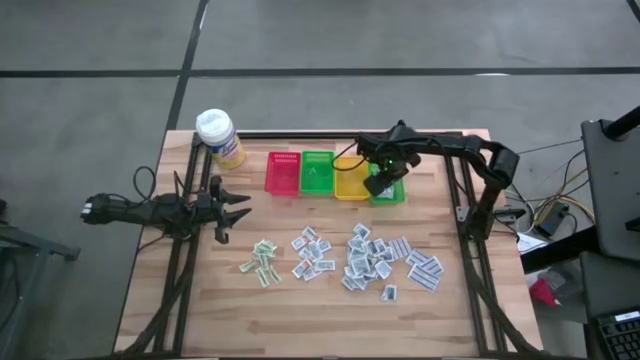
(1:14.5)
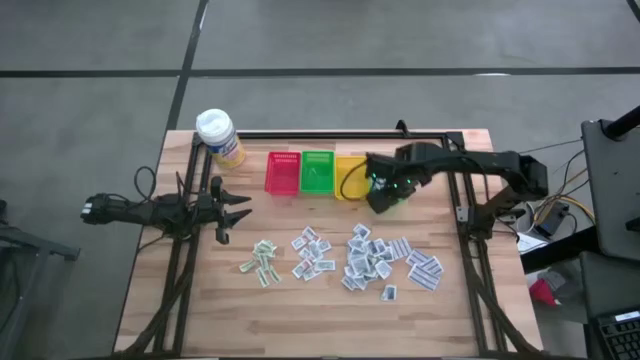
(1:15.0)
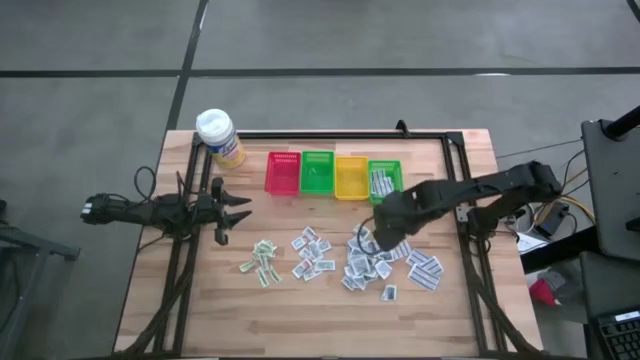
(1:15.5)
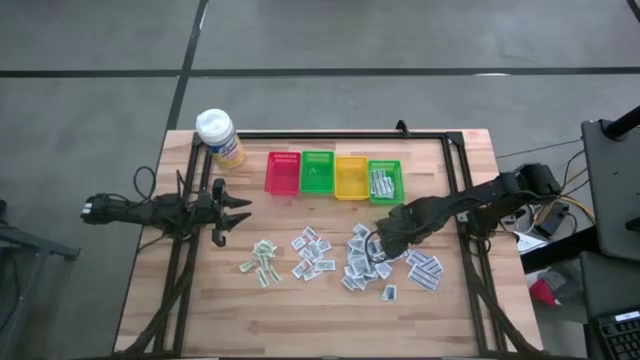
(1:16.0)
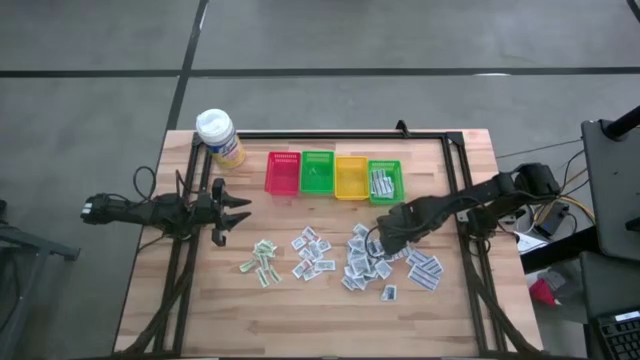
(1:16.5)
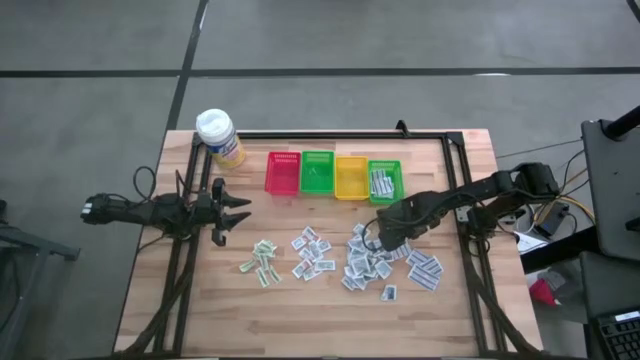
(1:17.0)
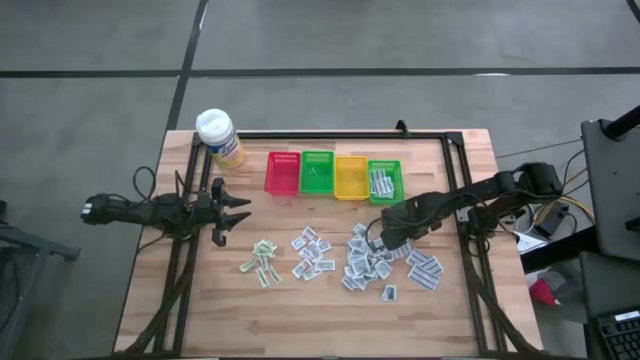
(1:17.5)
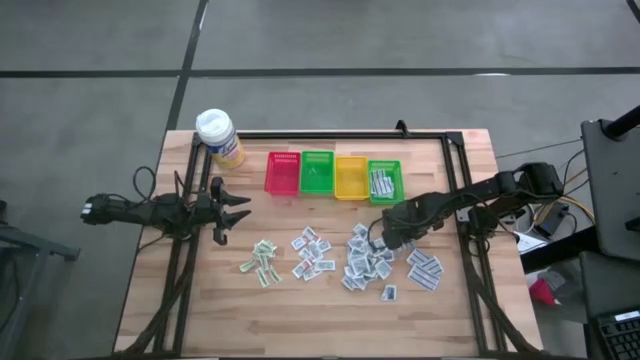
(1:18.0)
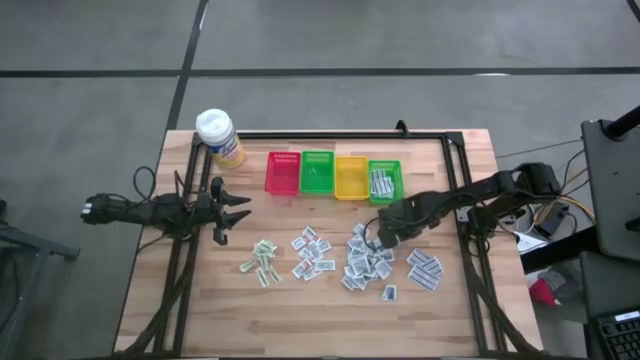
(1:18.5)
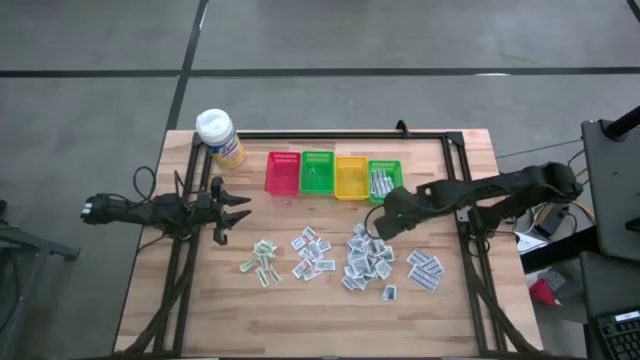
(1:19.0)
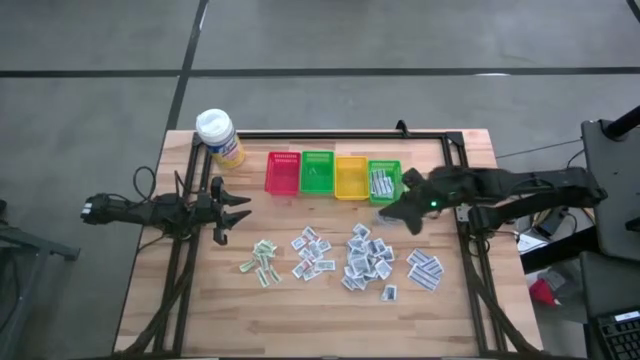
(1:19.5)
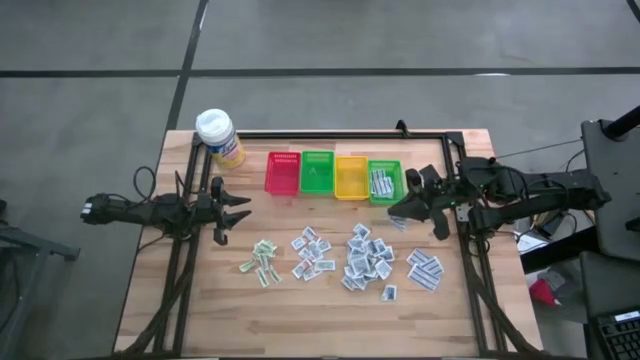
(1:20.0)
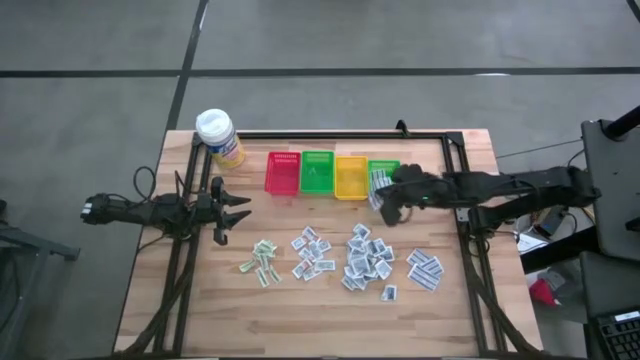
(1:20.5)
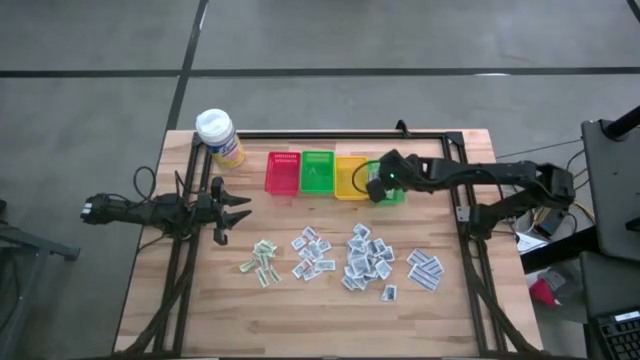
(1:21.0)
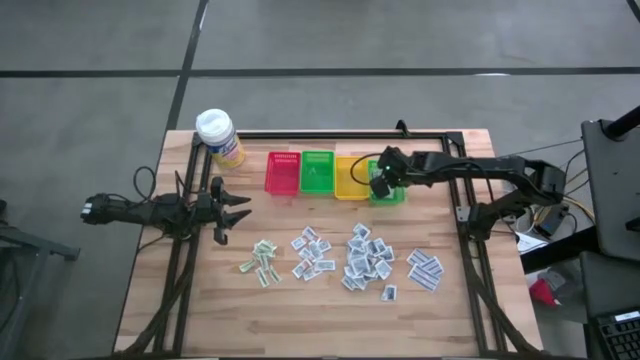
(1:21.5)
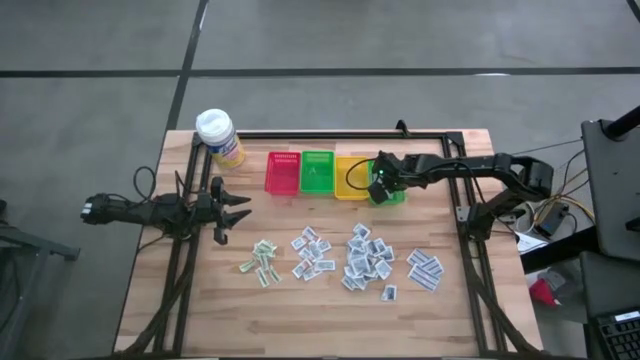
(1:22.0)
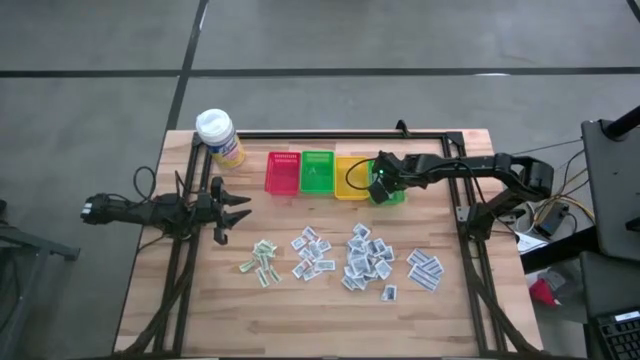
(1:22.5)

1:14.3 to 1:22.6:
Task: Pick & Place First Aid Supplies
Put the blue bandage into the right green bin

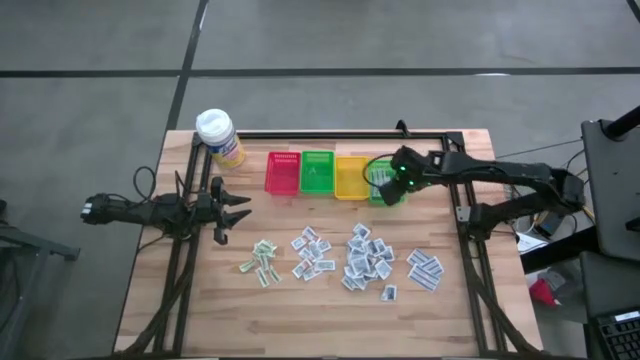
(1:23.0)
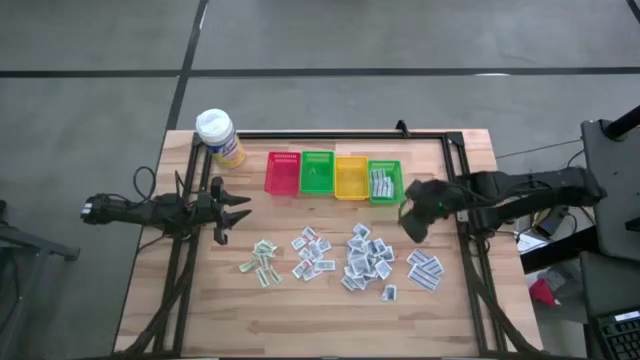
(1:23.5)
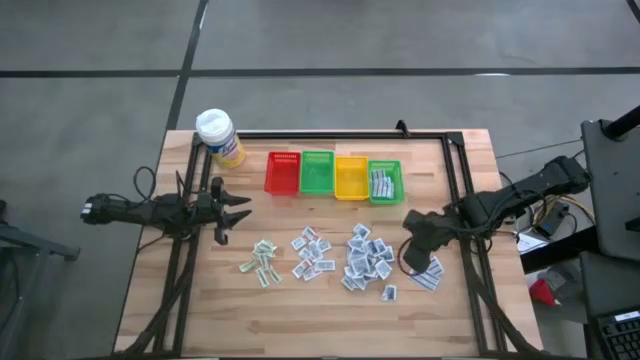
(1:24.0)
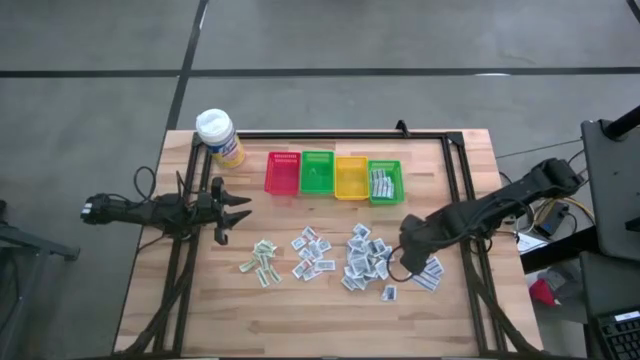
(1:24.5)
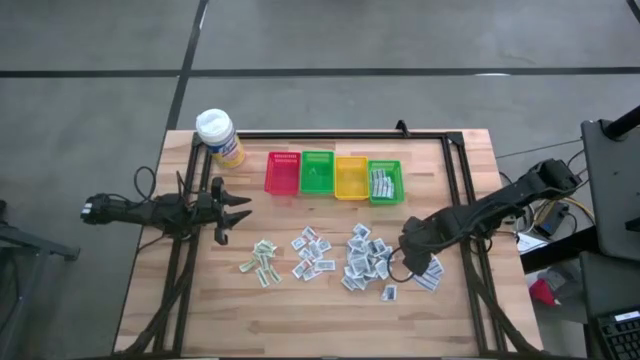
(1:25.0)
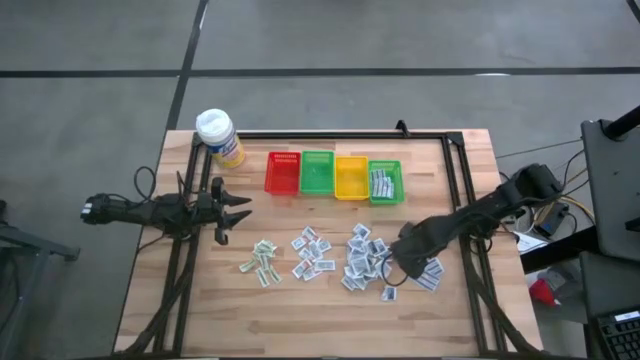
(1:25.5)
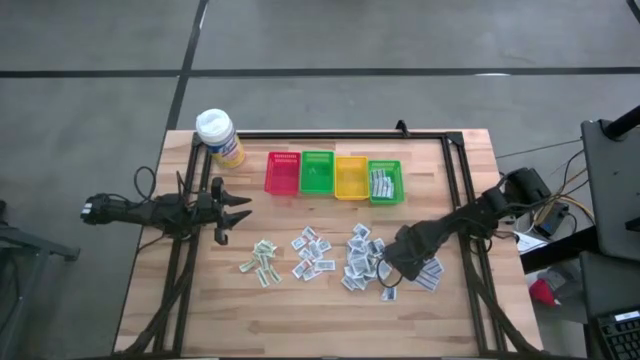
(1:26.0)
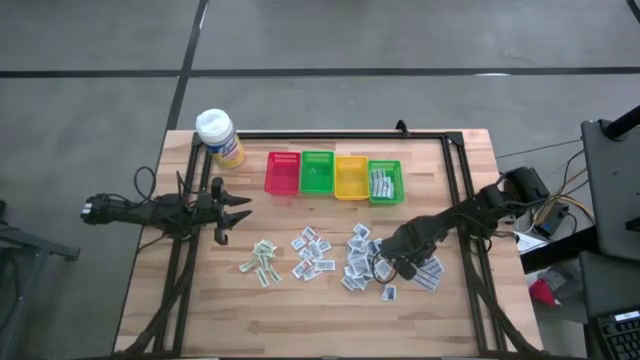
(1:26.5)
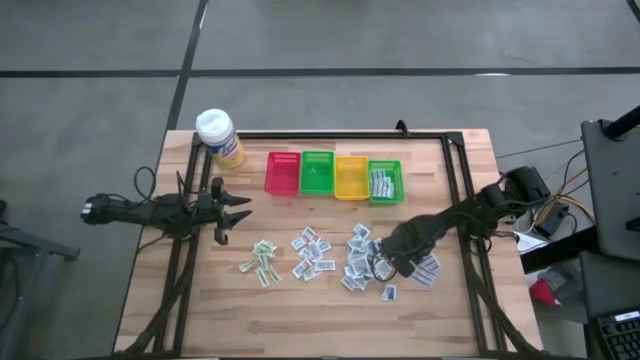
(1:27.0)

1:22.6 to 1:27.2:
Put the blue bandage into the right green bin

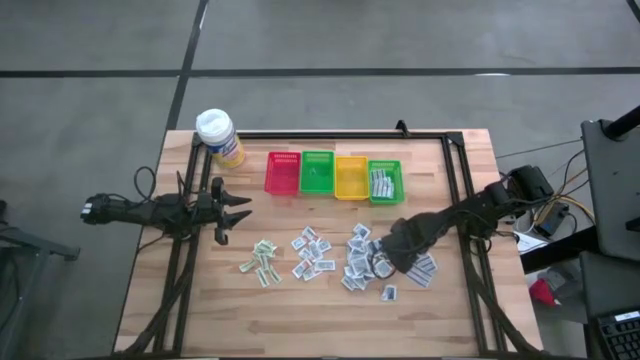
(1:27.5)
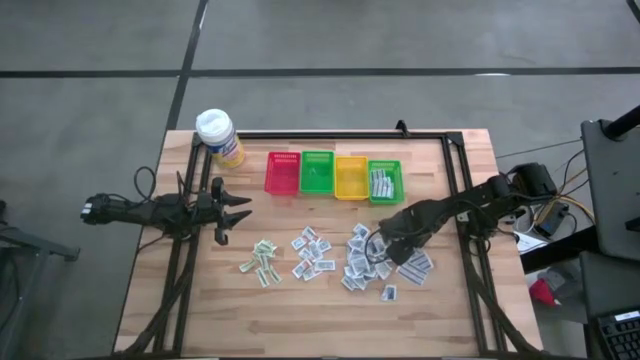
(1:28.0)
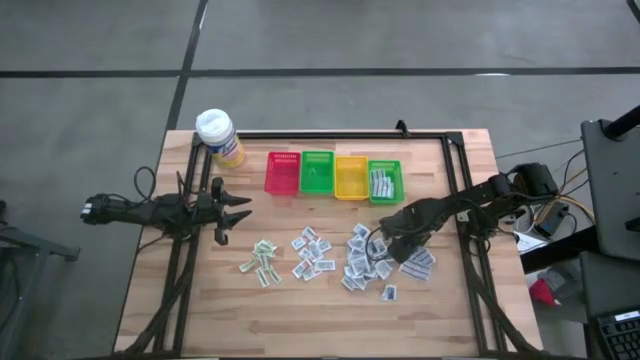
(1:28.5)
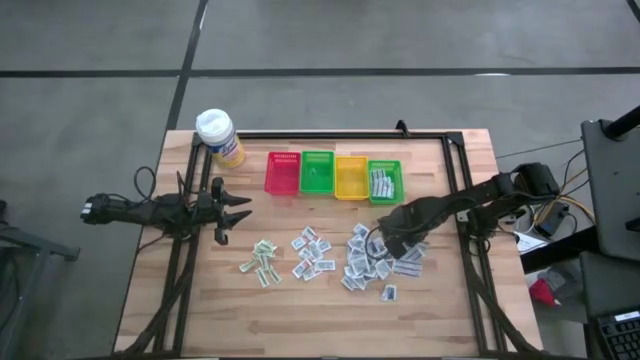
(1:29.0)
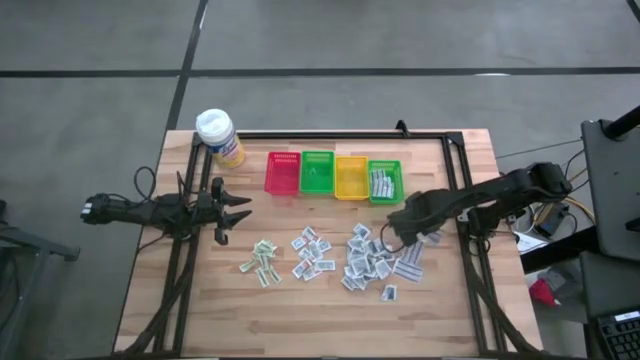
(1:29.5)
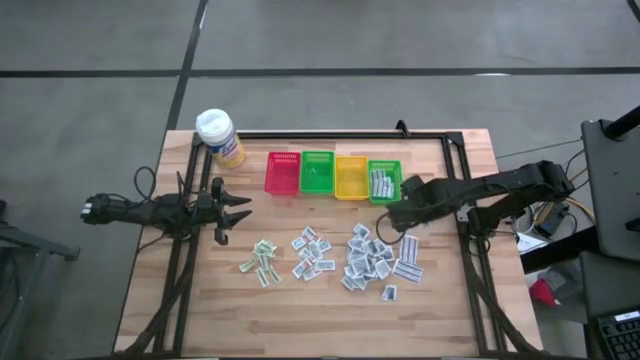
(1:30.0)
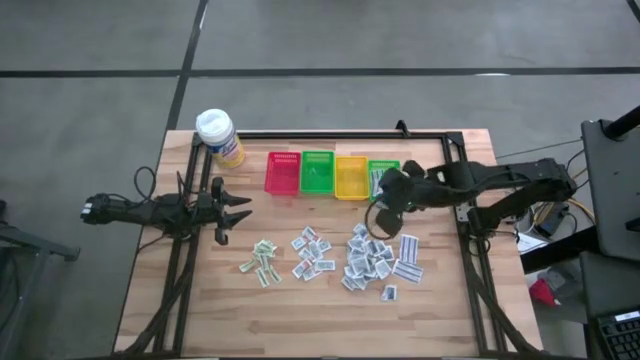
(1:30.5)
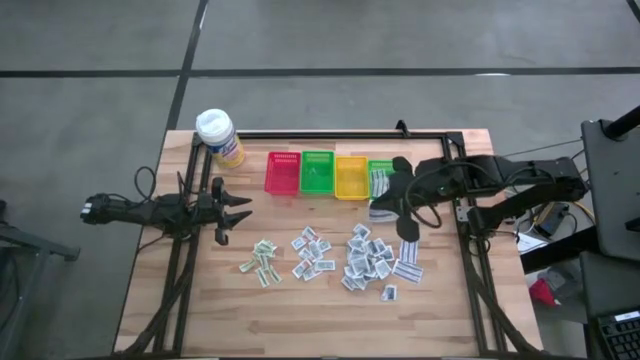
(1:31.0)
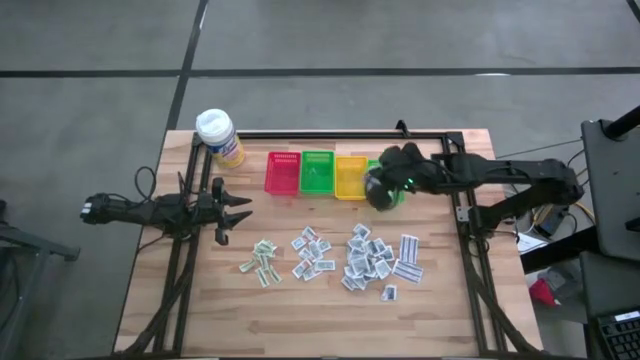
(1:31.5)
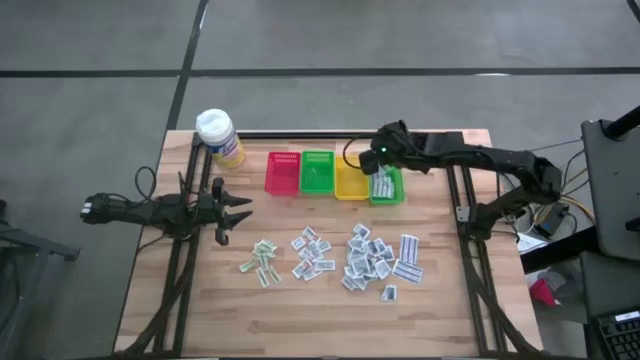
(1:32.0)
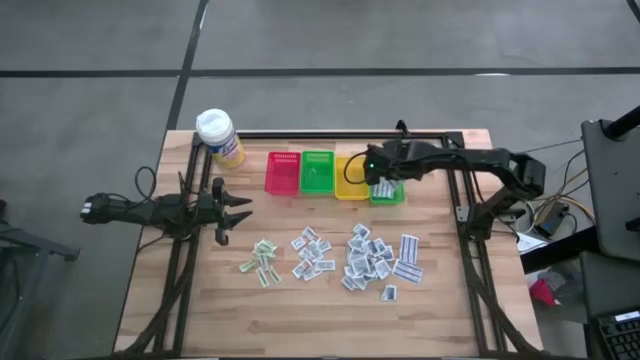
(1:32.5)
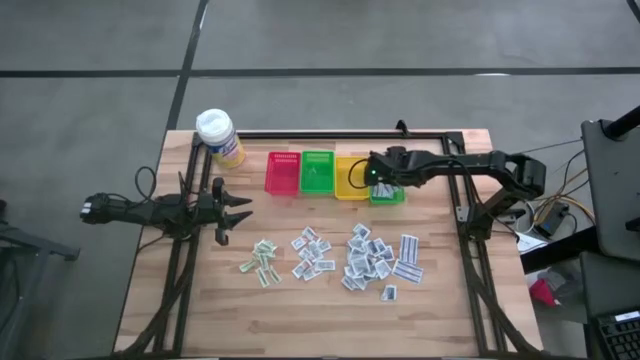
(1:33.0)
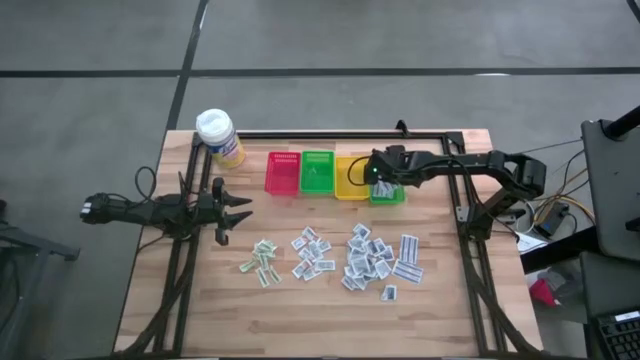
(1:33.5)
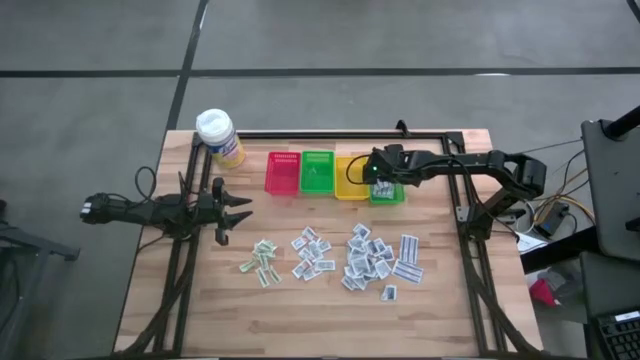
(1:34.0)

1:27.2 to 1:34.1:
Put the blue bandage into the right green bin

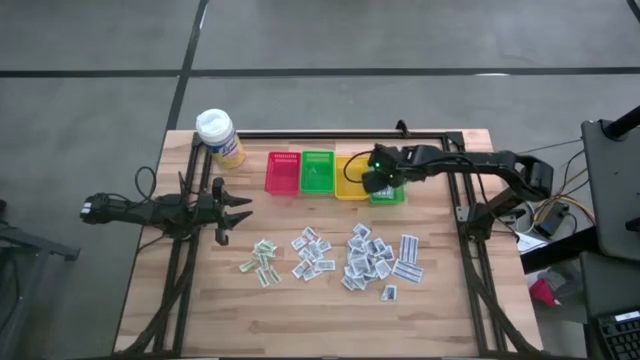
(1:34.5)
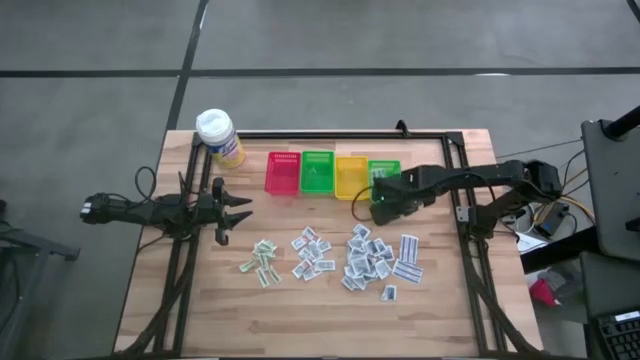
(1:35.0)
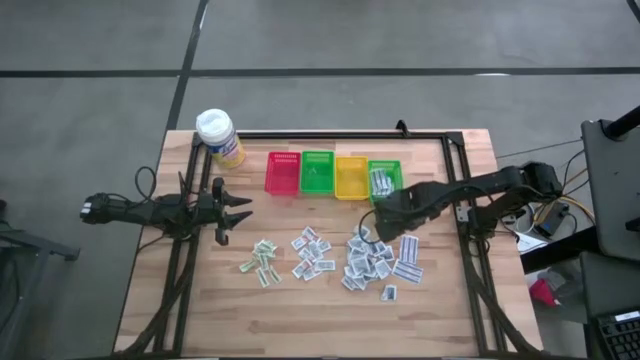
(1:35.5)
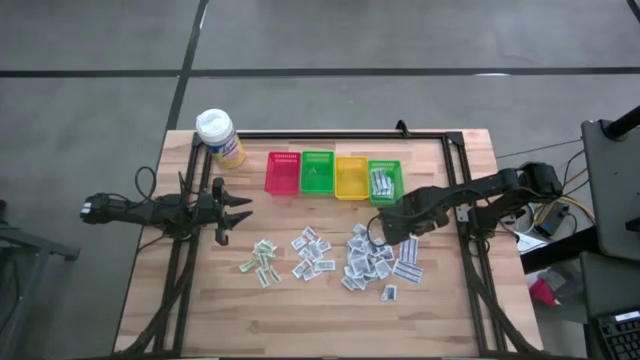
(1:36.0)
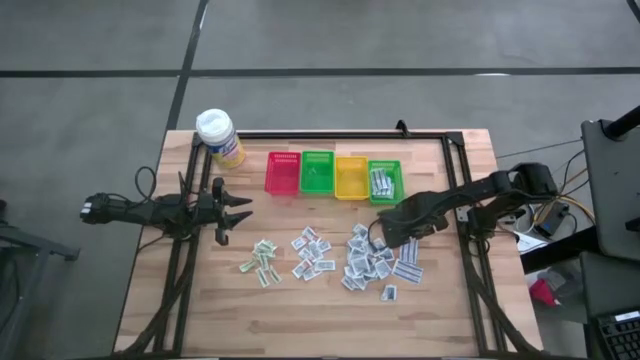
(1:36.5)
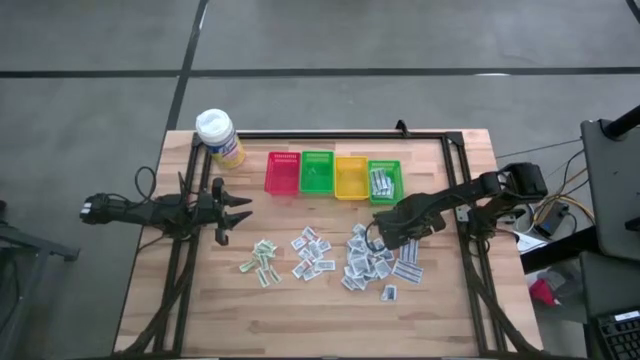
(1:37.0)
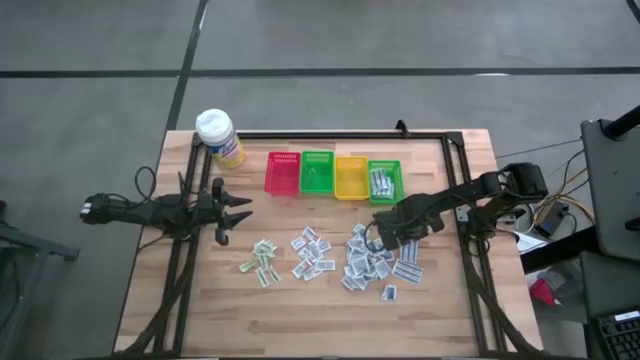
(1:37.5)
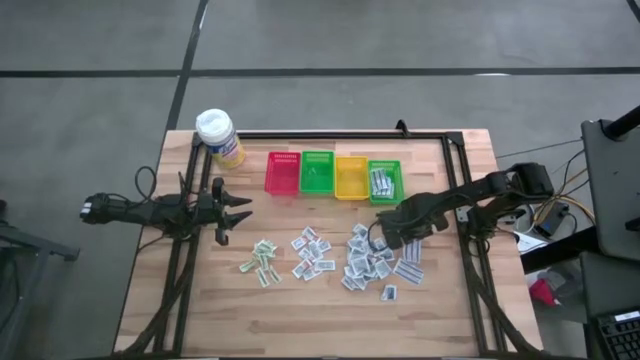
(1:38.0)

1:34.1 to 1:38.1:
Put the blue bandage into the right green bin
